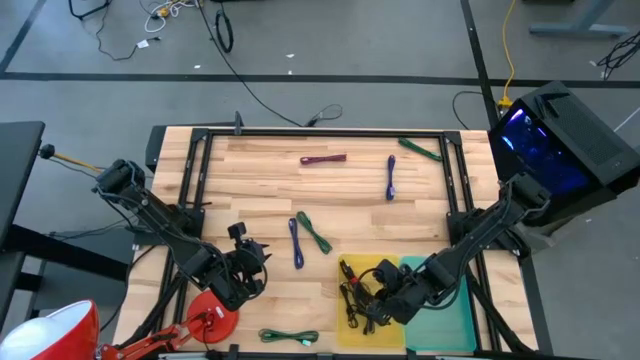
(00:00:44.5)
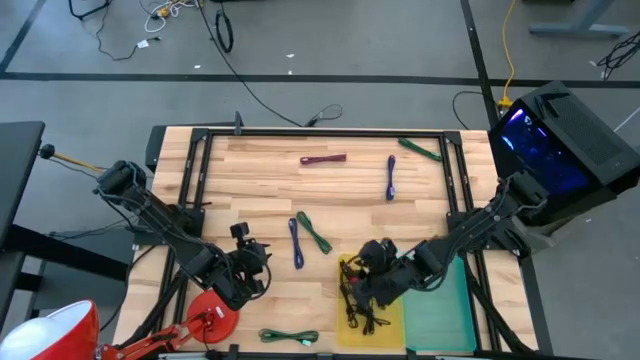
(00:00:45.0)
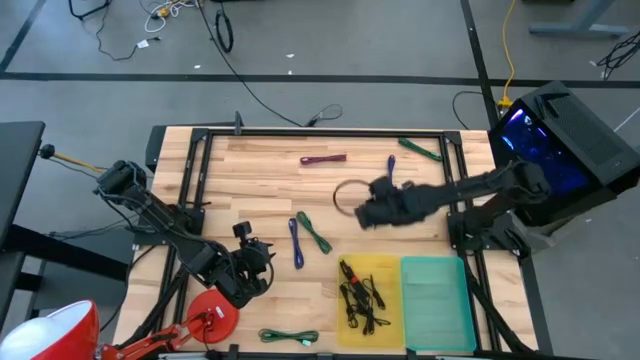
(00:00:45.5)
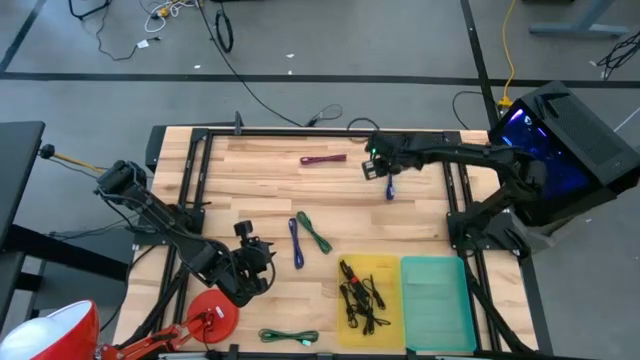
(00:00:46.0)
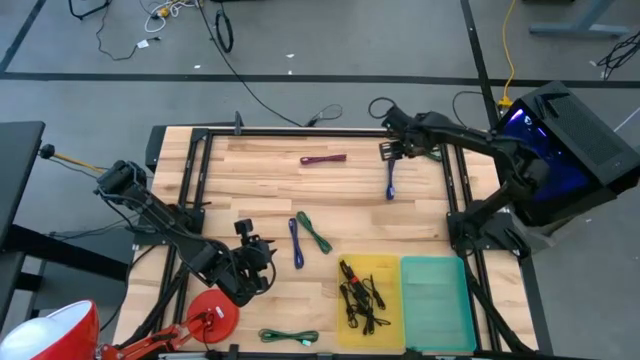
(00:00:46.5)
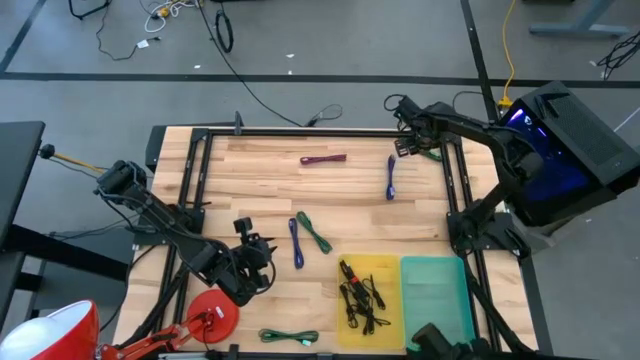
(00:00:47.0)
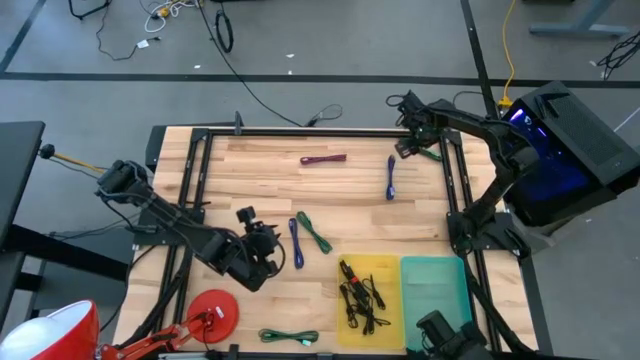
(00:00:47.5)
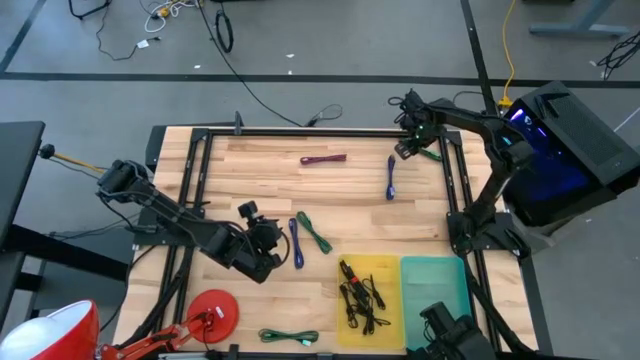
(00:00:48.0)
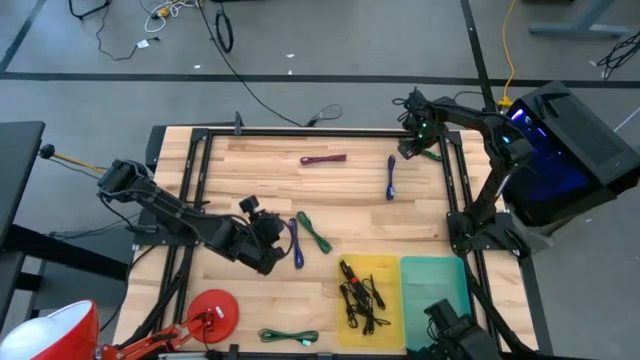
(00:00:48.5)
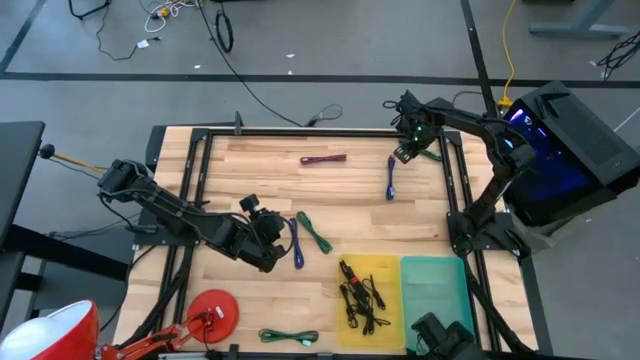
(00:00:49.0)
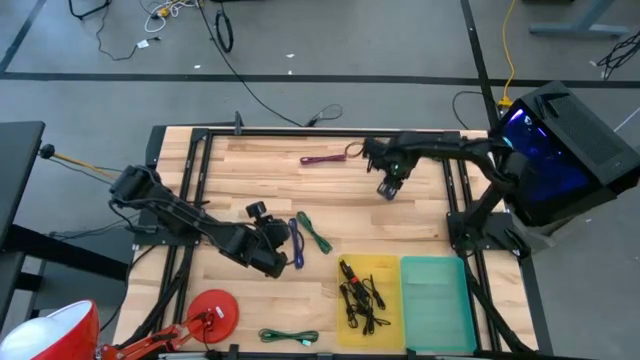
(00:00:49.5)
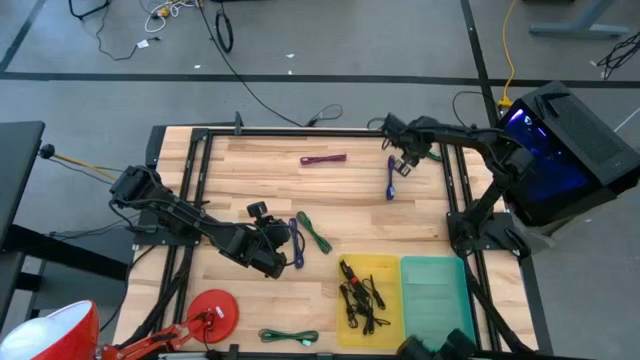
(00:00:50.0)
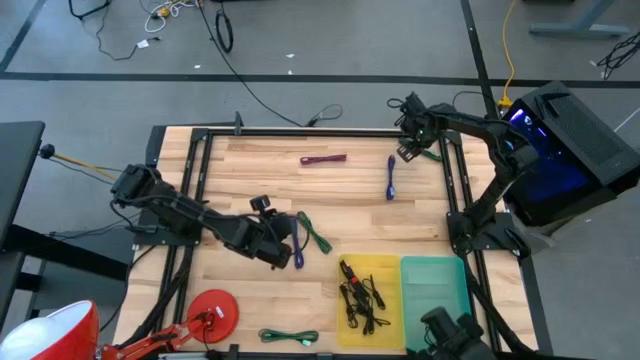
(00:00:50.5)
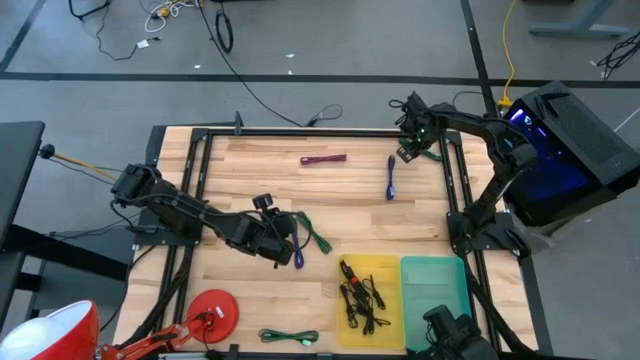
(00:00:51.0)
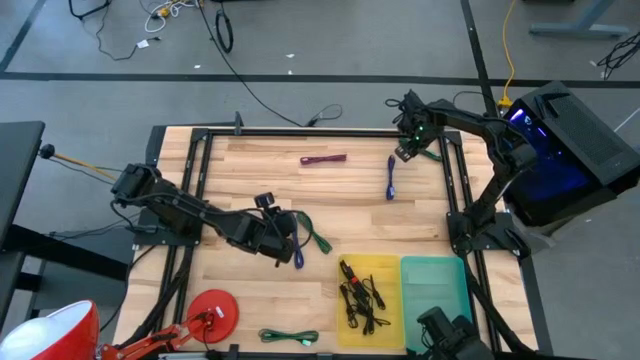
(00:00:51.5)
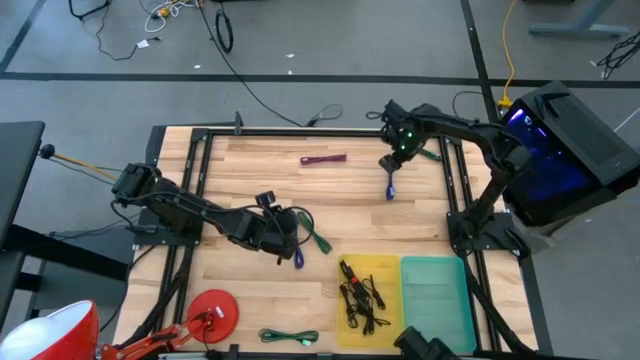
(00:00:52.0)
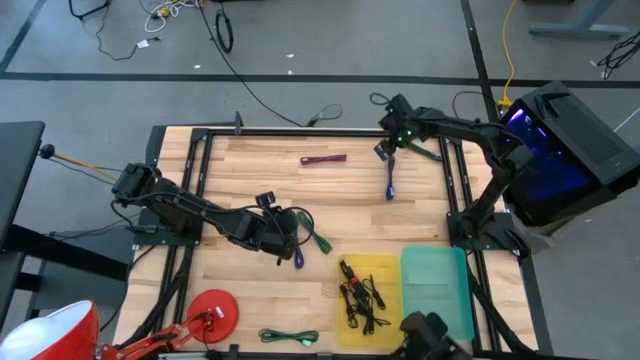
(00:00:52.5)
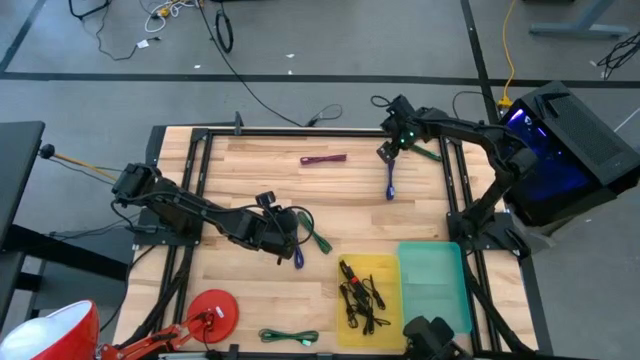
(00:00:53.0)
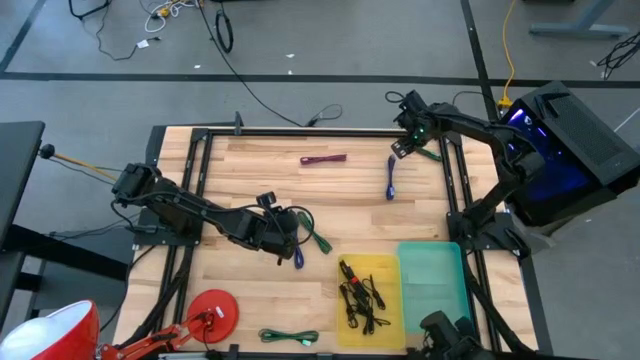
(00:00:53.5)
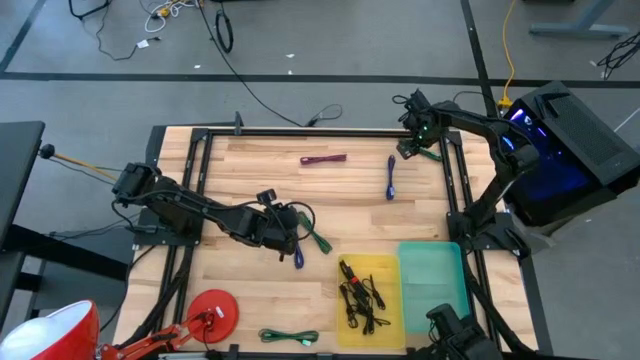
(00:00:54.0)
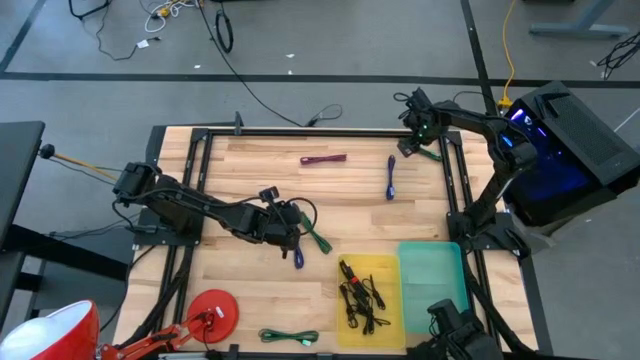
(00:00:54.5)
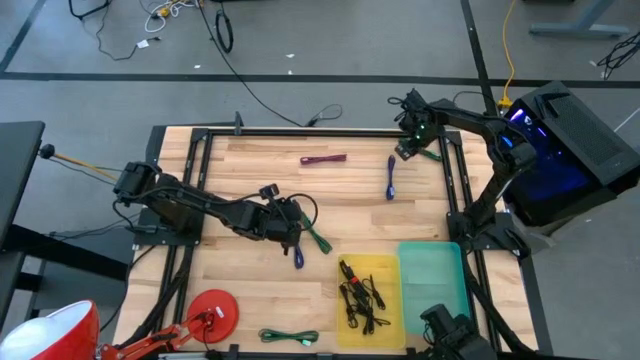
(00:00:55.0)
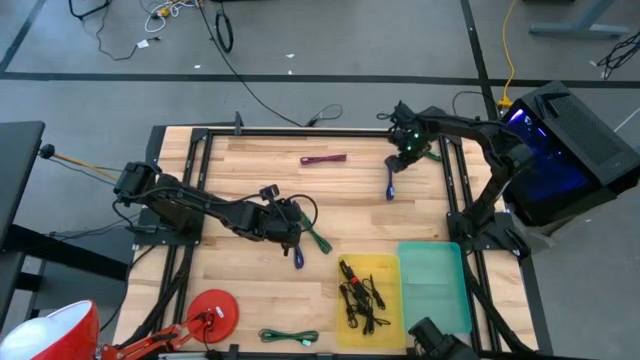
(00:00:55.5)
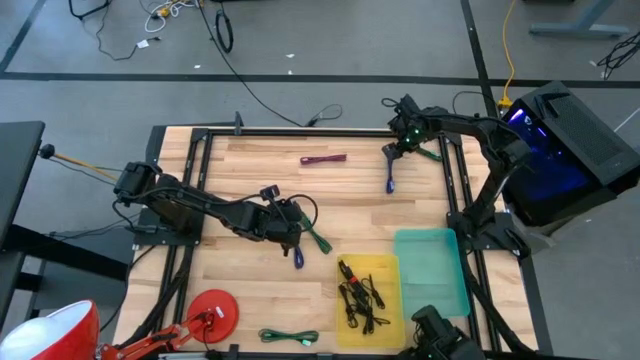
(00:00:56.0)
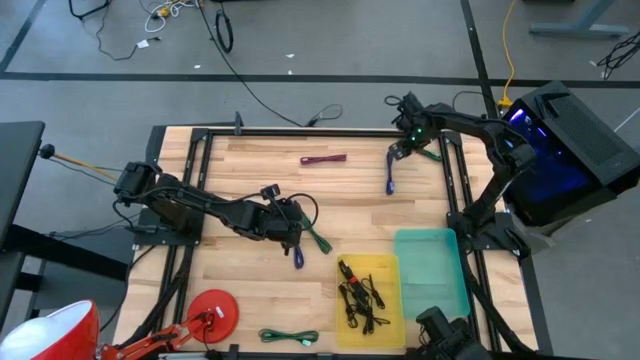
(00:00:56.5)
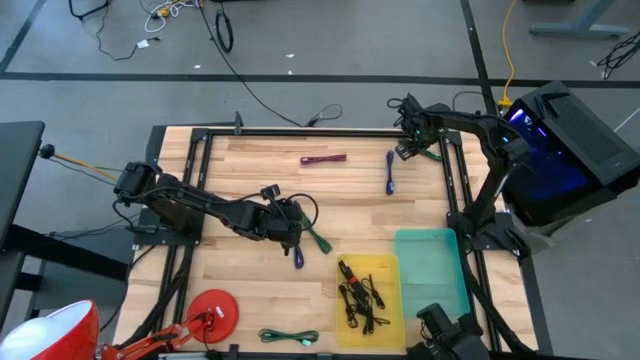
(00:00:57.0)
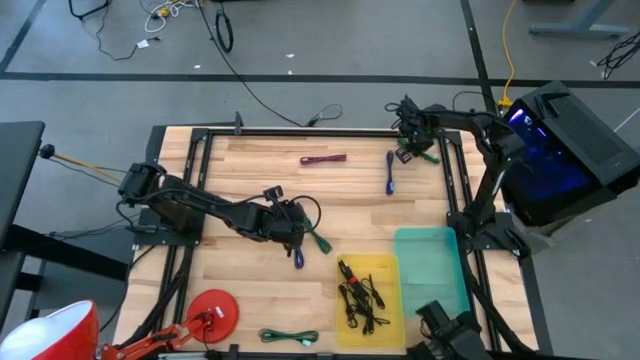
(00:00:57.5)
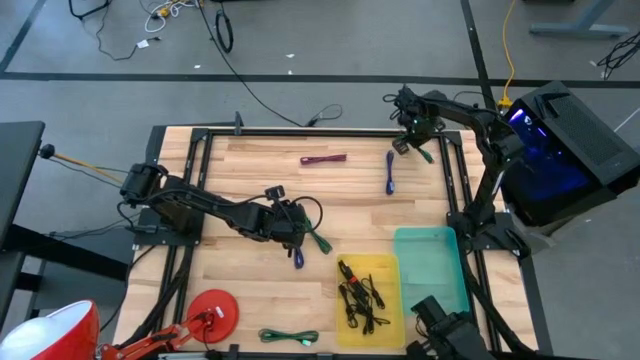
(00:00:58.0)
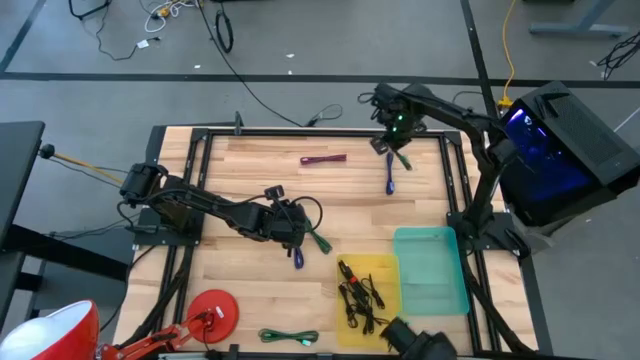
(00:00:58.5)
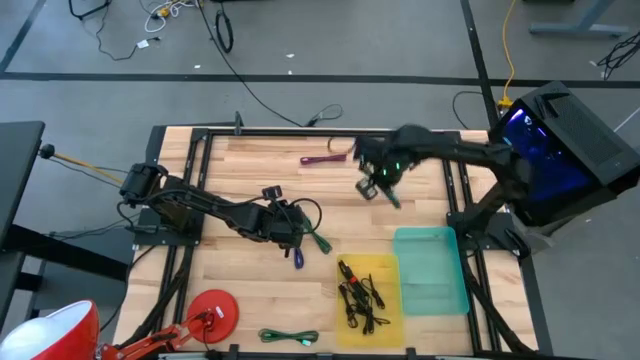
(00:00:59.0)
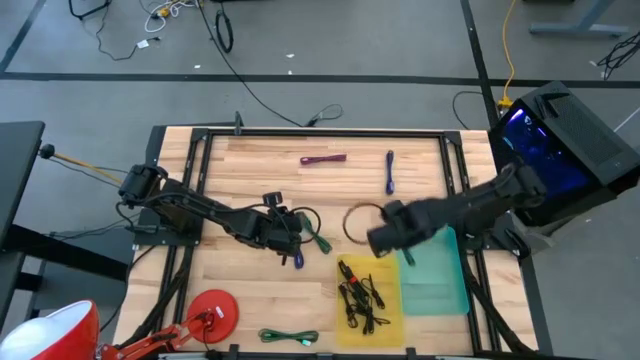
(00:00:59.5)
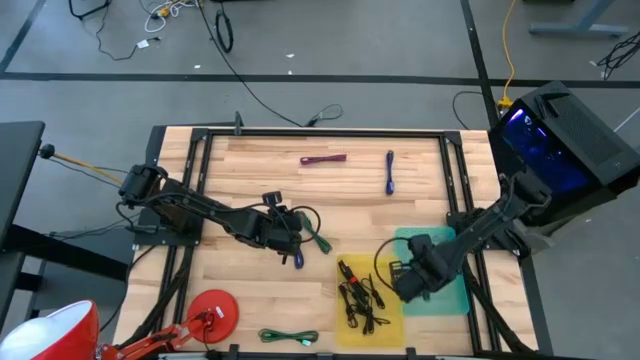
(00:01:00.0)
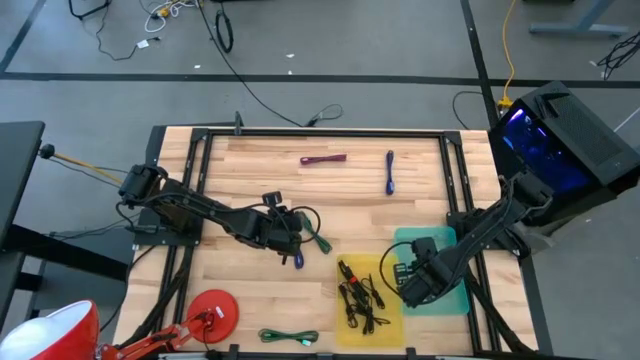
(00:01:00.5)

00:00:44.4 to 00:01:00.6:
Task: Pick & Place USB Port
Put the top right green patterned charger cable into the blue bin

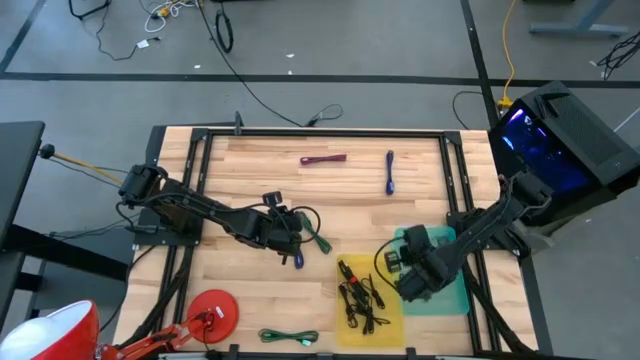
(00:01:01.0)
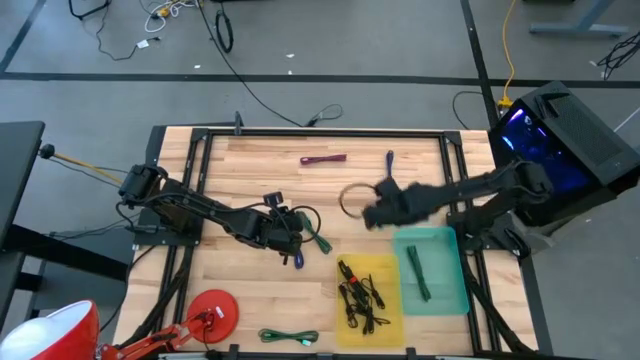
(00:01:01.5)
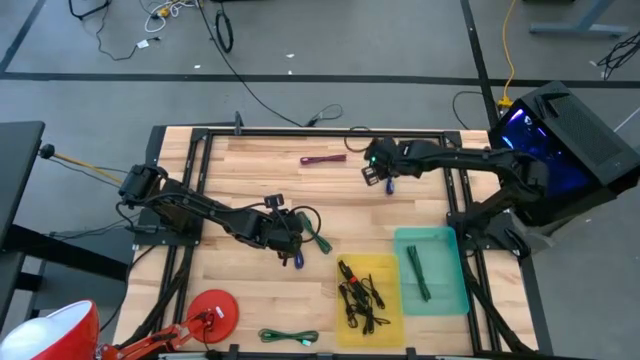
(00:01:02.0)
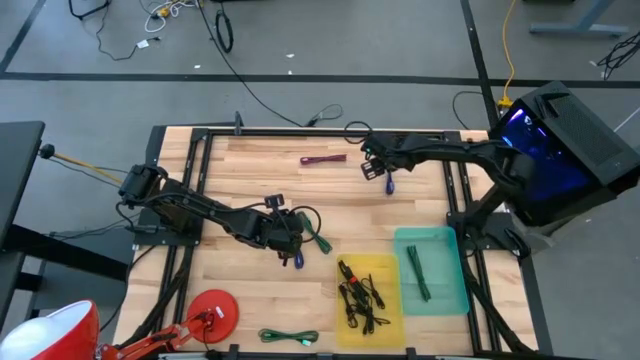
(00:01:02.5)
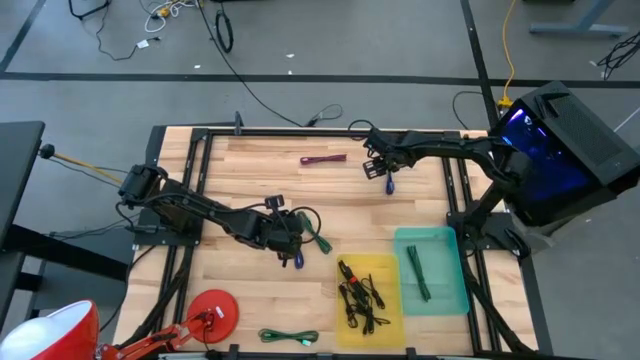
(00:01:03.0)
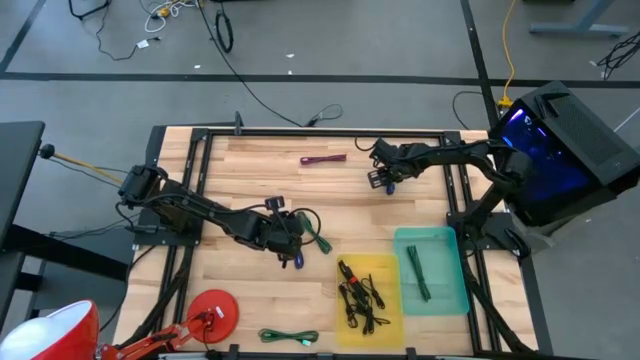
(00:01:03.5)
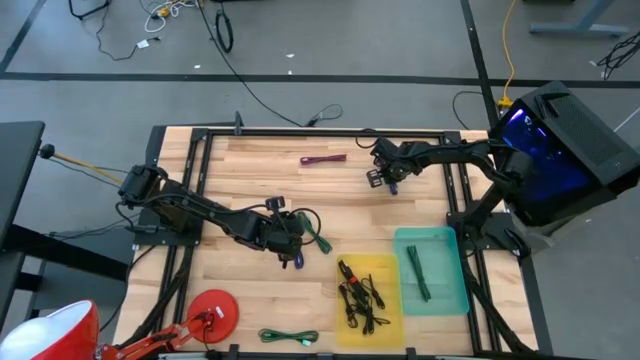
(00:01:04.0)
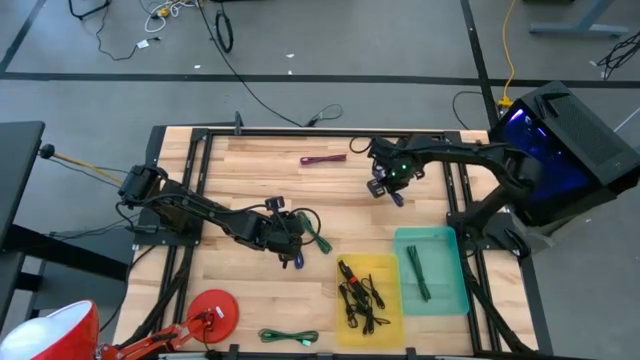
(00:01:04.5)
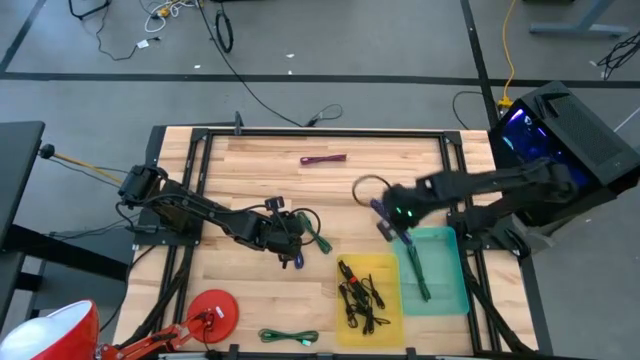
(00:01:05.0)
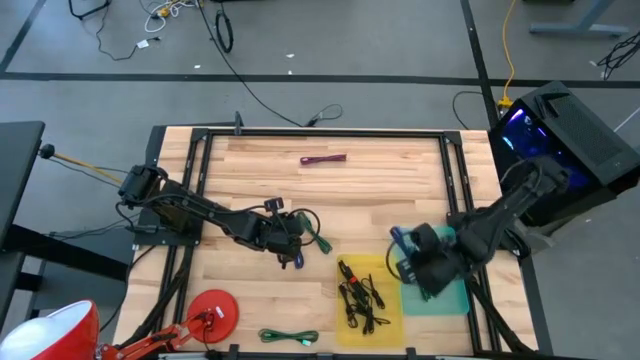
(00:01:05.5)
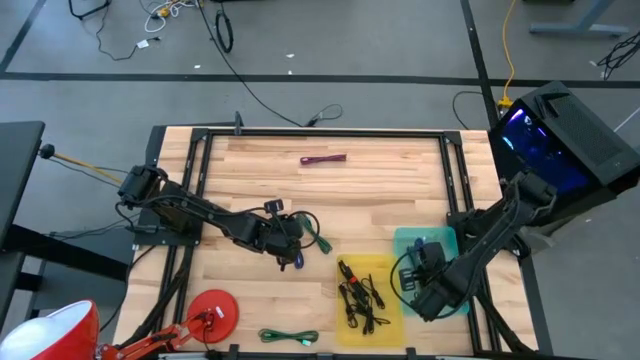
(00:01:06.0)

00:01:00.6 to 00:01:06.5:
Put the right blue pattern charger cable into the blue bin
